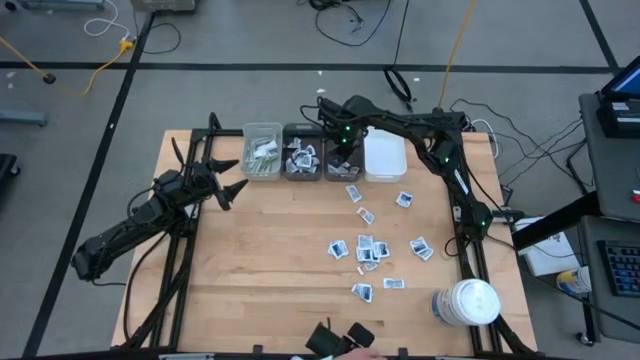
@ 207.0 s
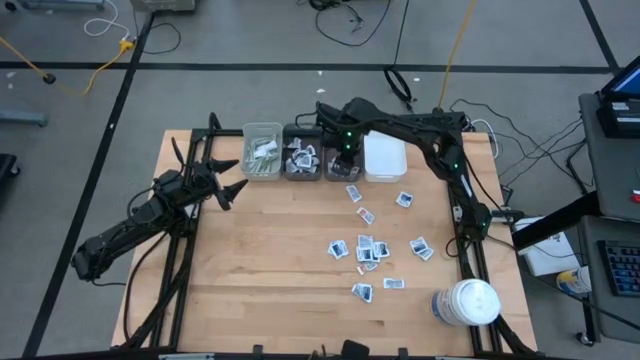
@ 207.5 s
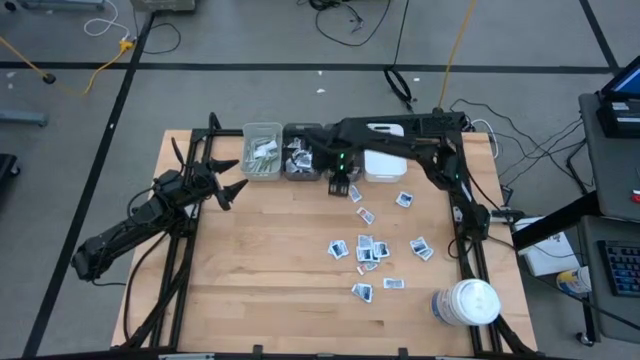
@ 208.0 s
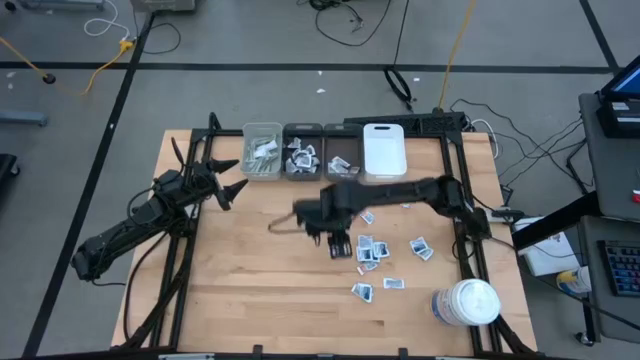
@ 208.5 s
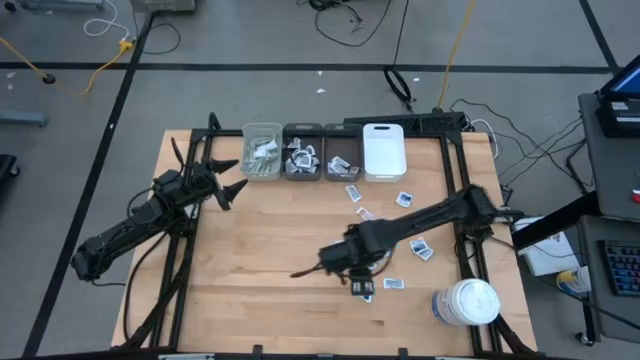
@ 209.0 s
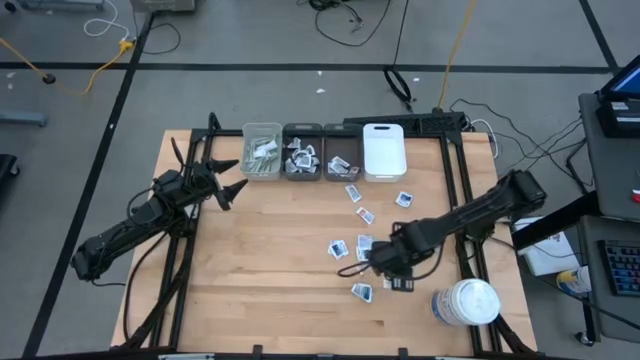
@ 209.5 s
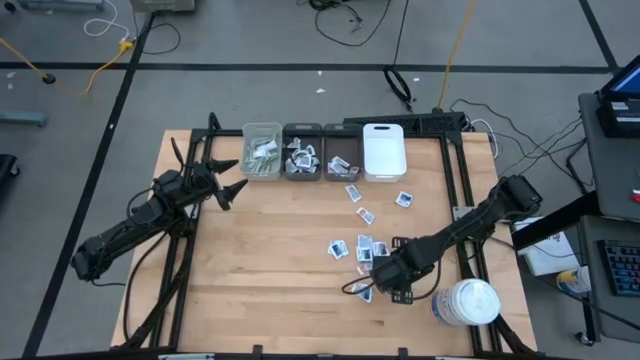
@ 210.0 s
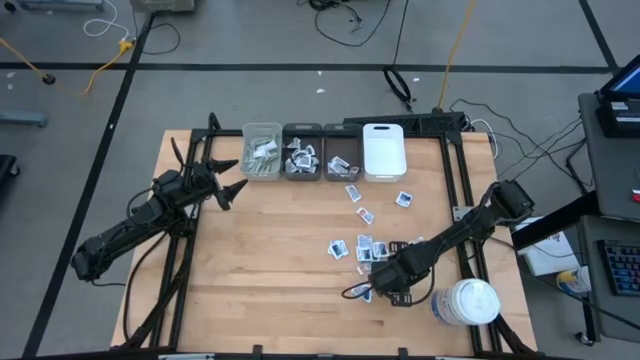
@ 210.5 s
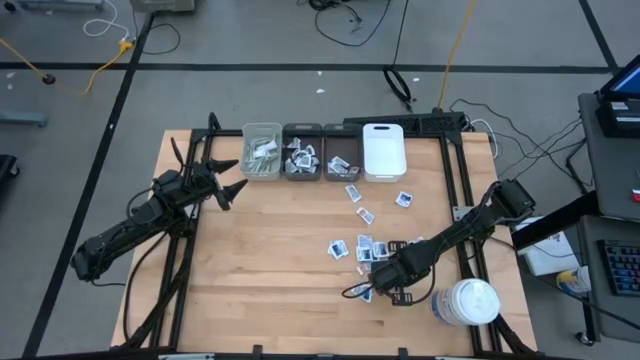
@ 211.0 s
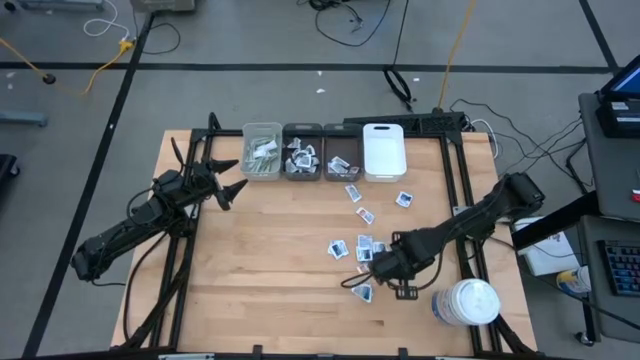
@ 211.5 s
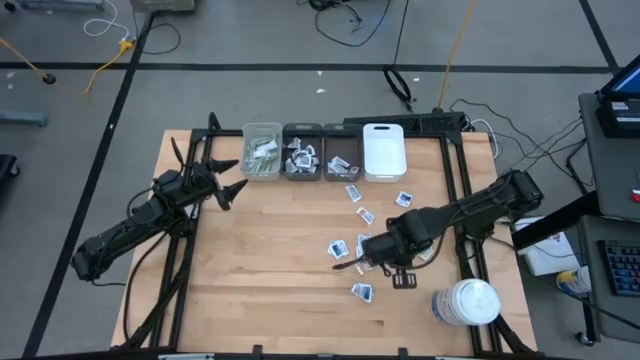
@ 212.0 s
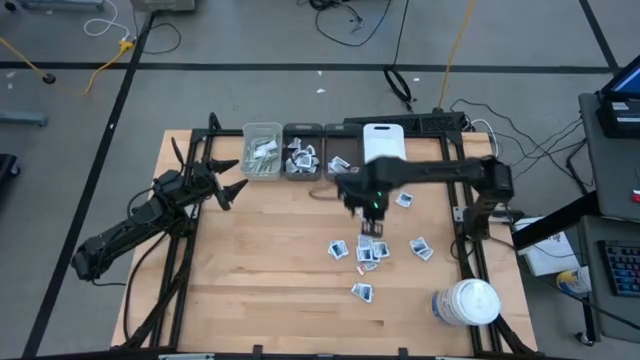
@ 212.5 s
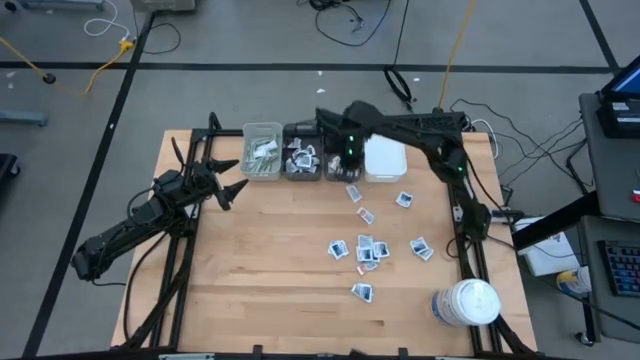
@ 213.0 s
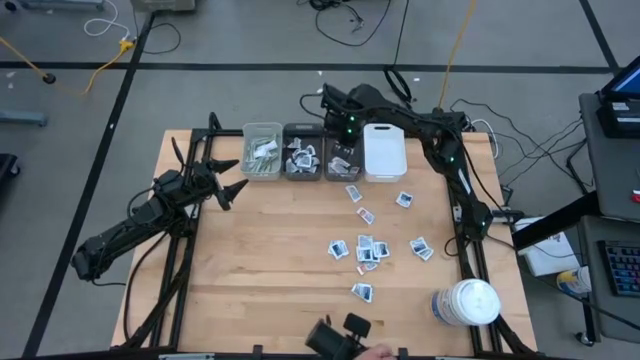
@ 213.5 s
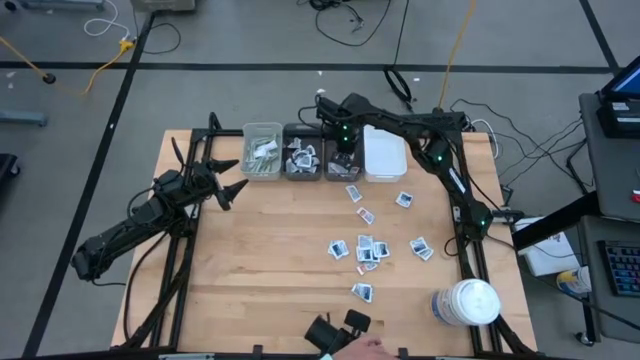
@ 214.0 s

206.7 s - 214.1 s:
Task: Pick & Place First Aid Supplies
Put the ointment pack into the right black bin

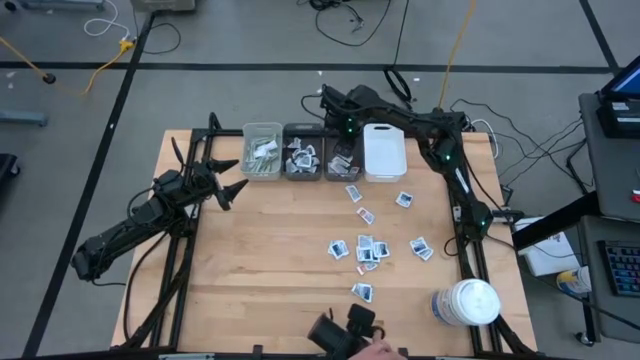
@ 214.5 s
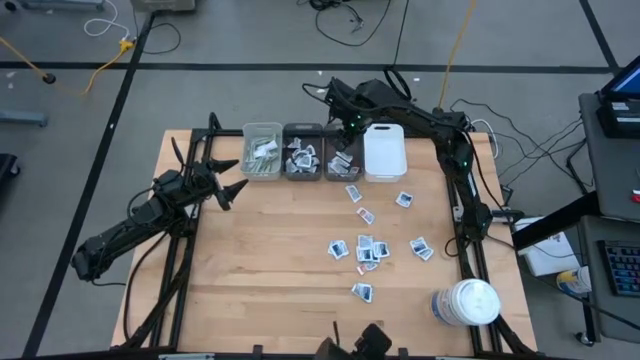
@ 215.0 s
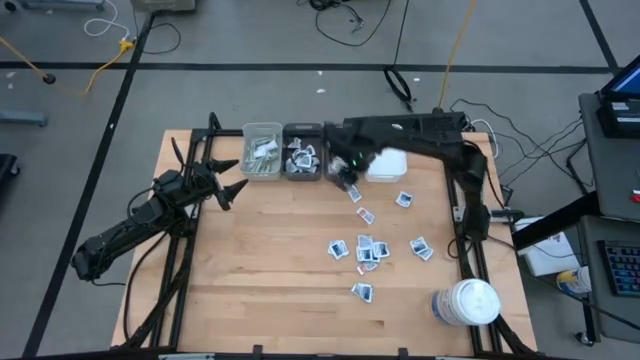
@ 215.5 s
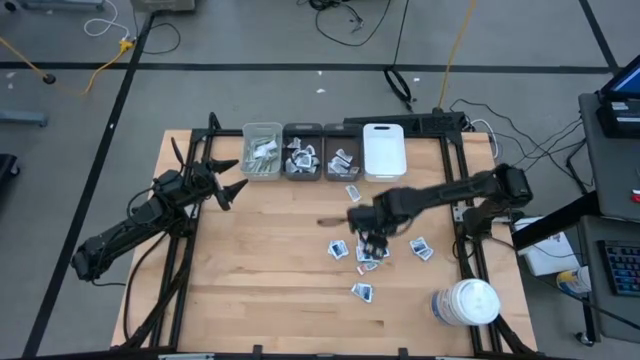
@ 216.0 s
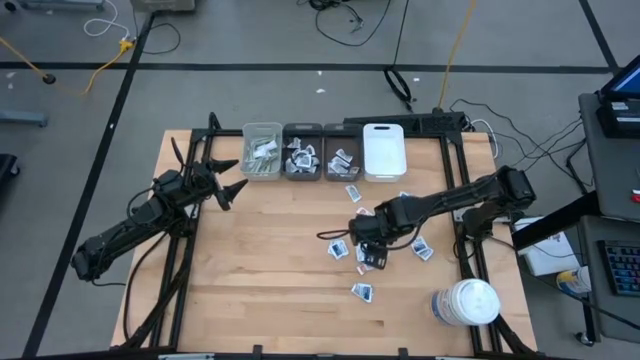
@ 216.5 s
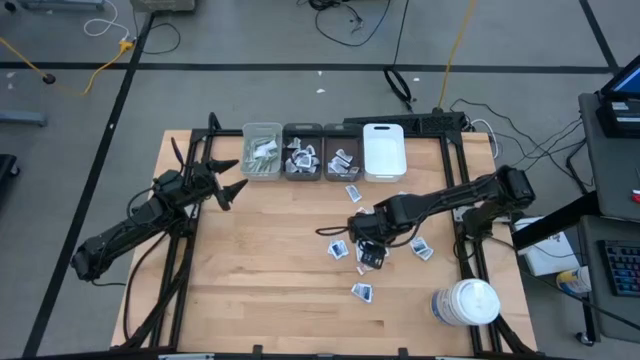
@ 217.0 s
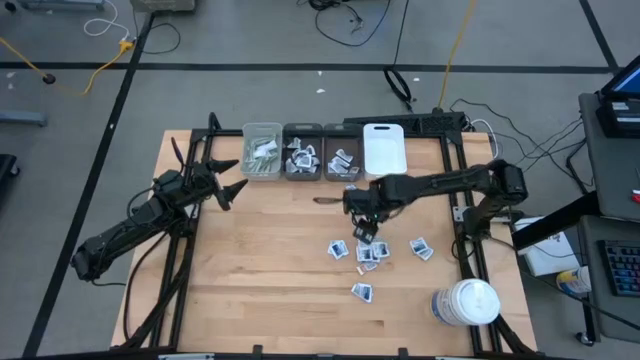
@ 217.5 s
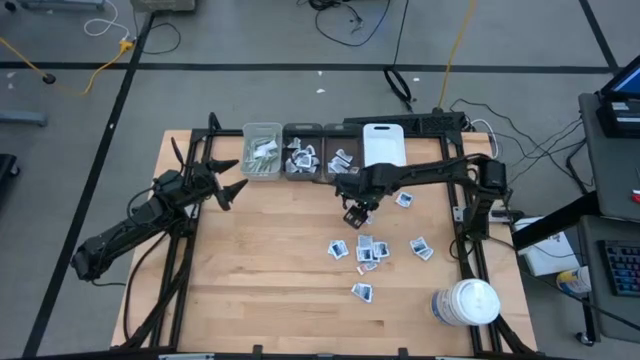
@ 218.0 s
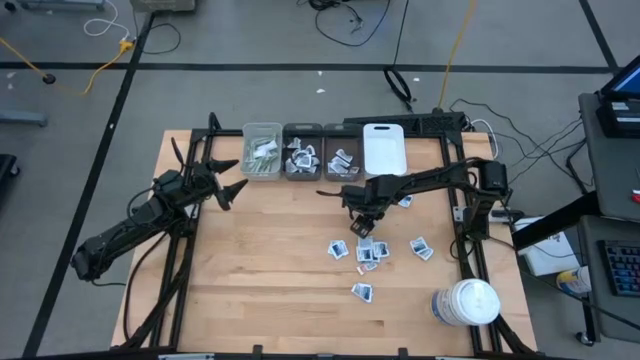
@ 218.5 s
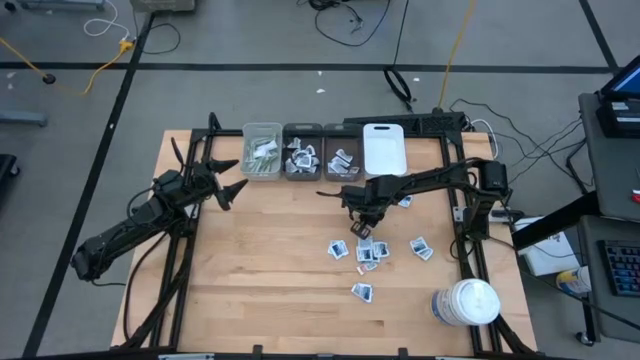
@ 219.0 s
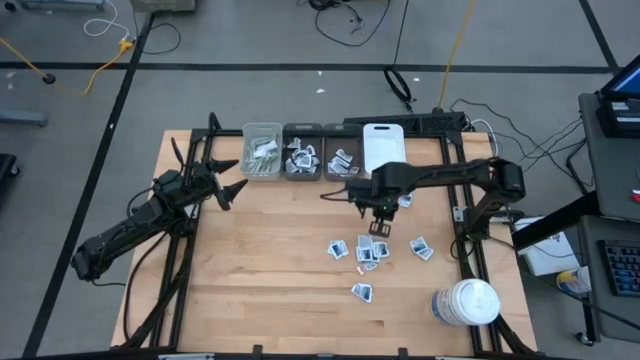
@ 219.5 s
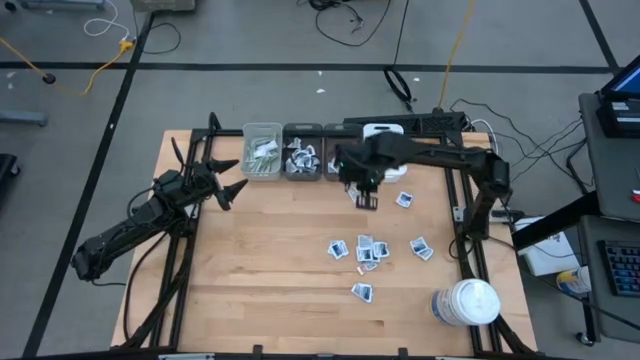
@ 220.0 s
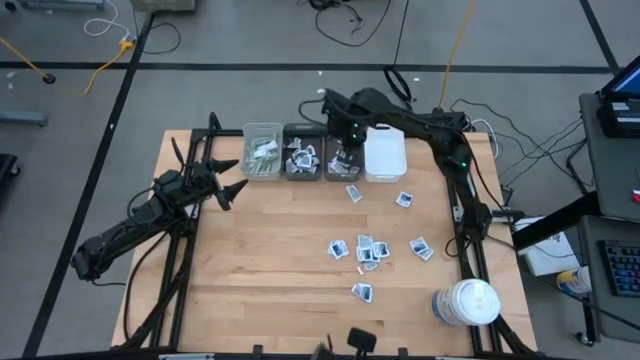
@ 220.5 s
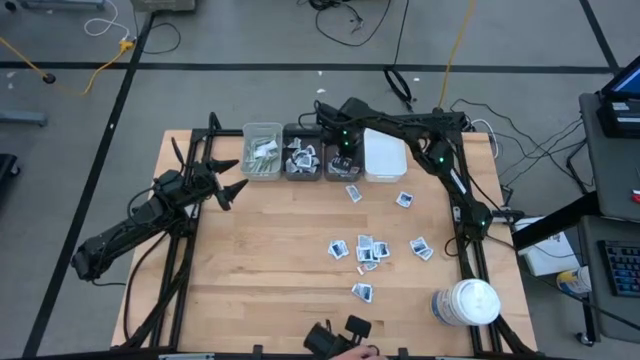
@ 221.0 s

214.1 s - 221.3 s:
Put the ointment pack into the right black bin

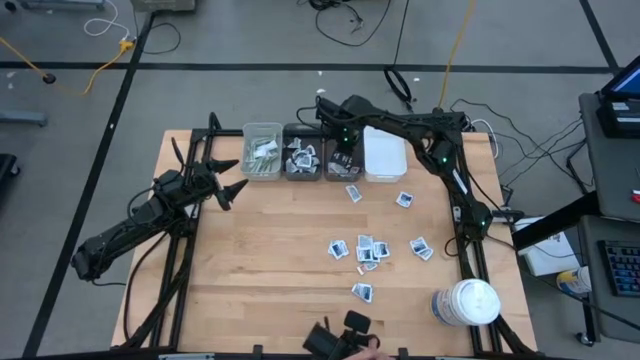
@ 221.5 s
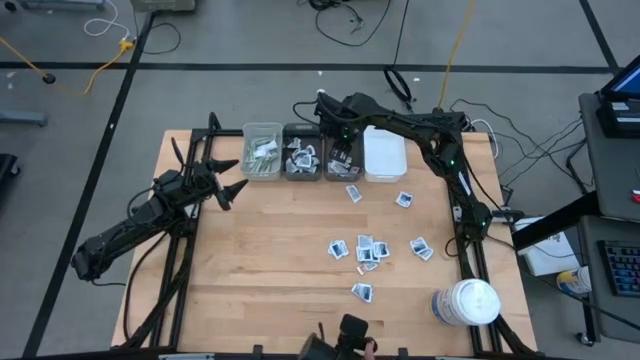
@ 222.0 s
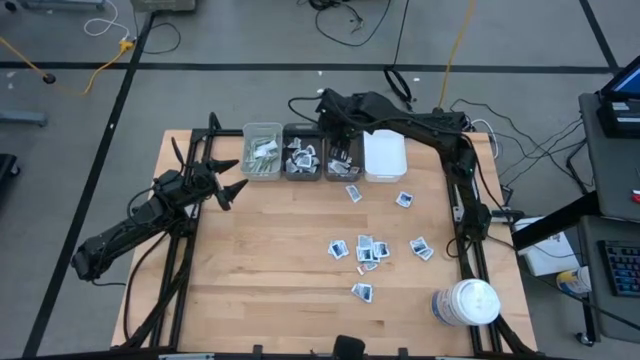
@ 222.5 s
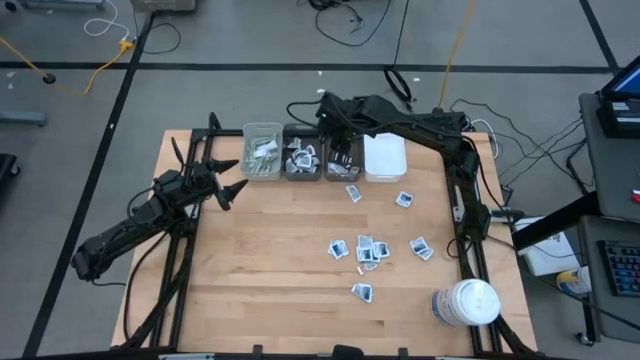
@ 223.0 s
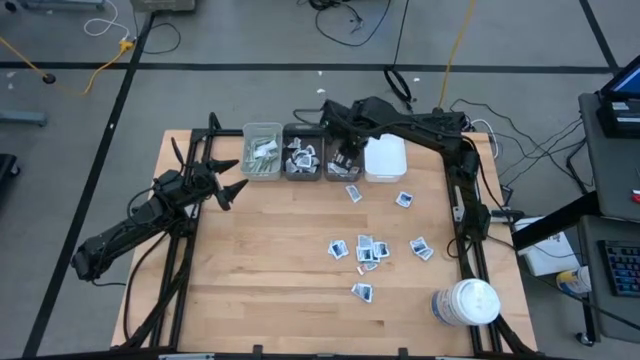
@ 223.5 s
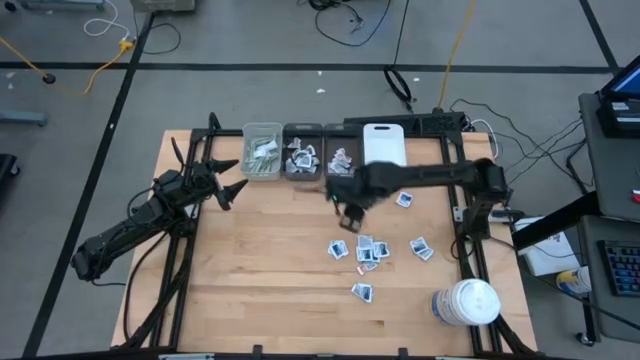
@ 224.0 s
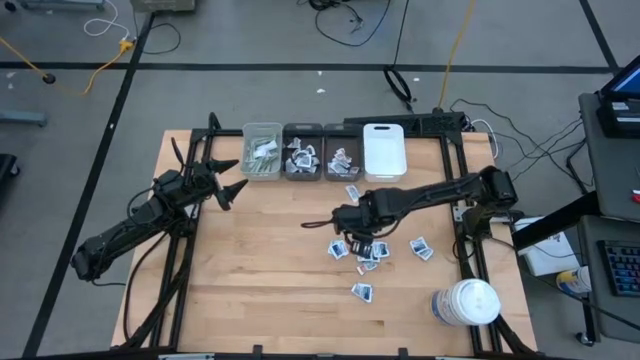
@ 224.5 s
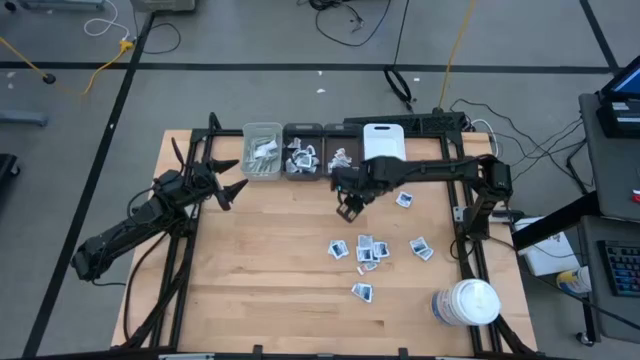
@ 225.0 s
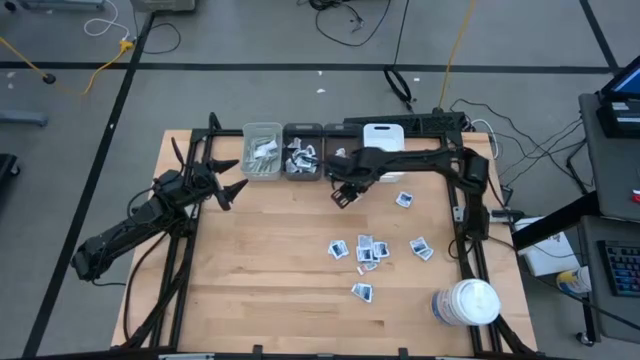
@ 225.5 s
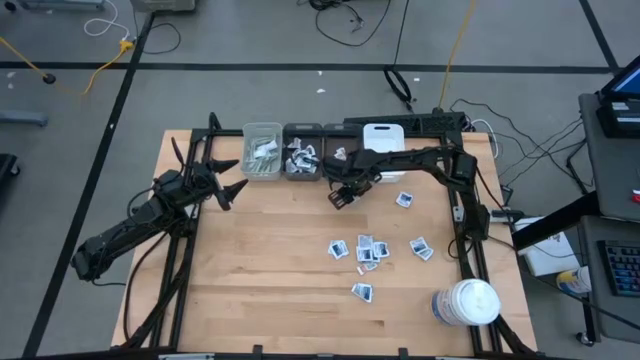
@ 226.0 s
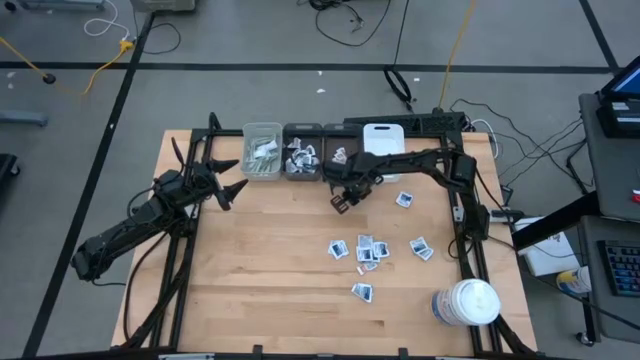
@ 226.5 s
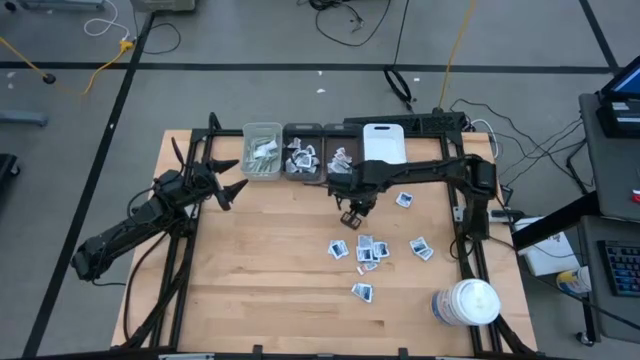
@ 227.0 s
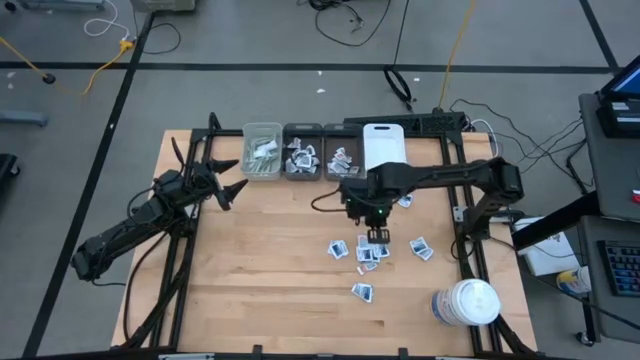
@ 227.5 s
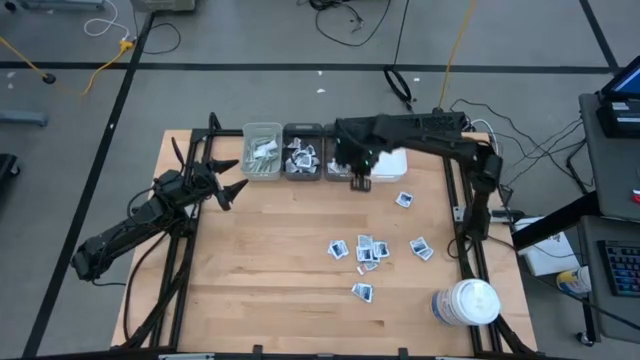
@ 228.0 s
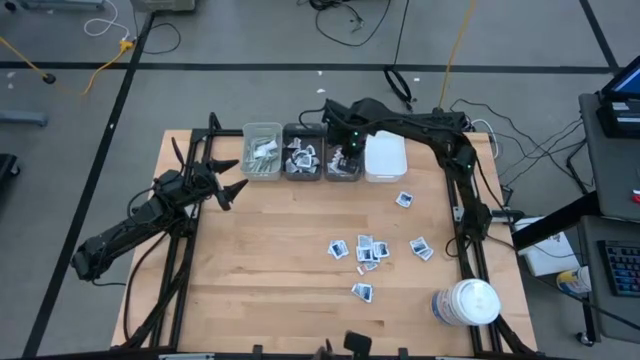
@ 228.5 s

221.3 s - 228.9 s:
Put the ointment pack into the right black bin
